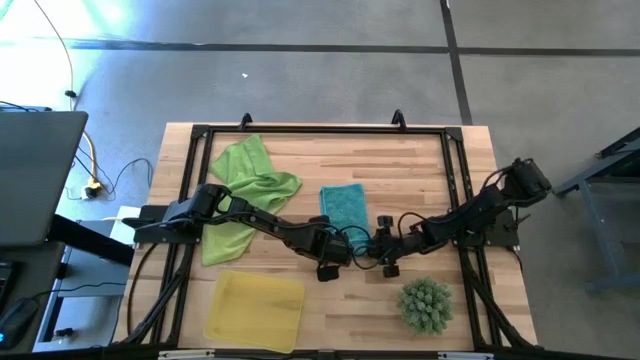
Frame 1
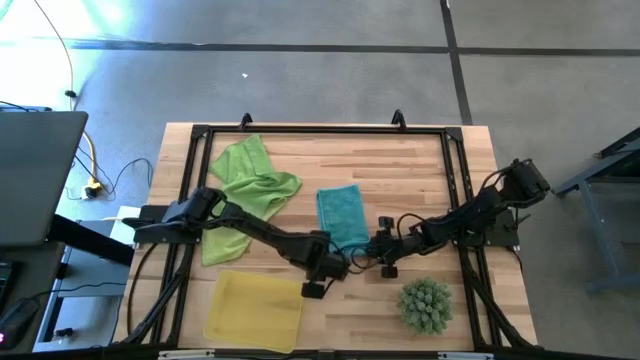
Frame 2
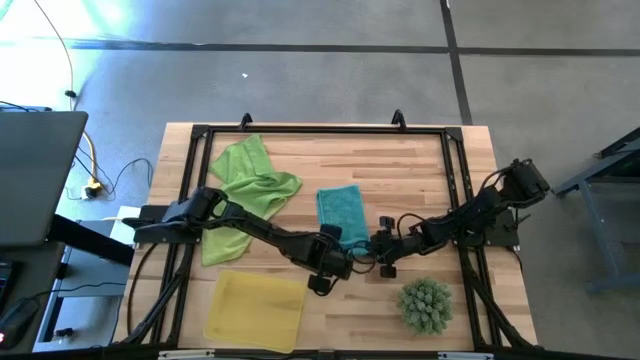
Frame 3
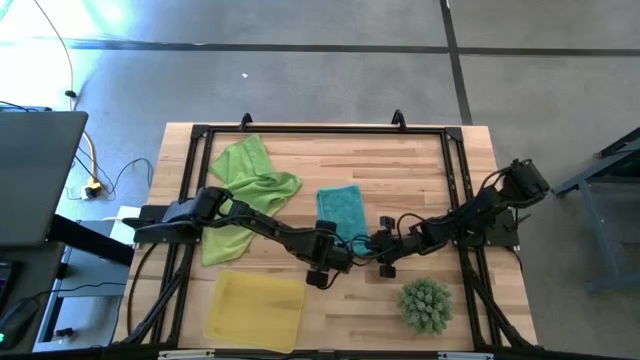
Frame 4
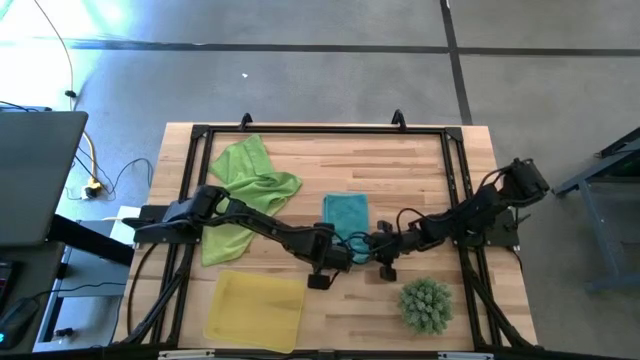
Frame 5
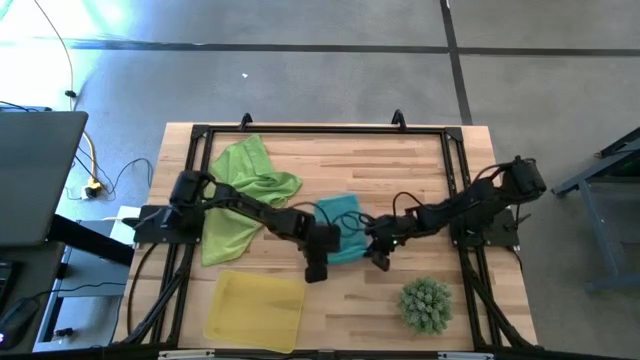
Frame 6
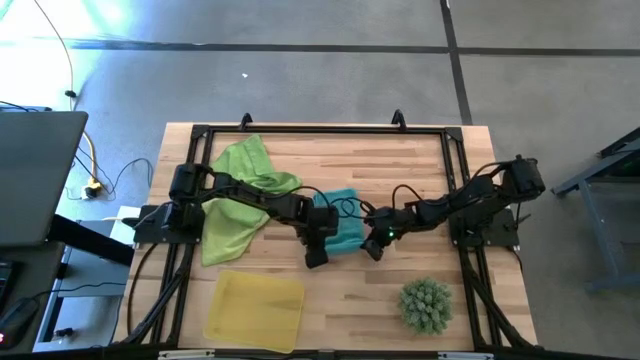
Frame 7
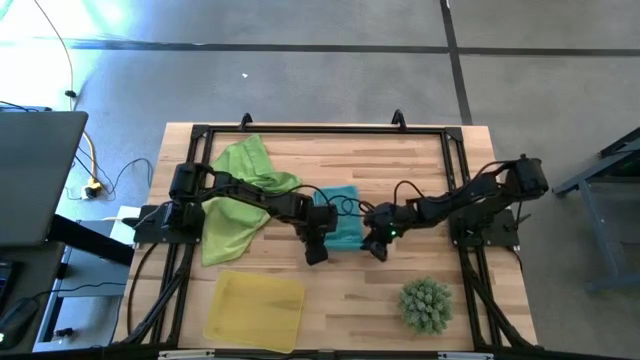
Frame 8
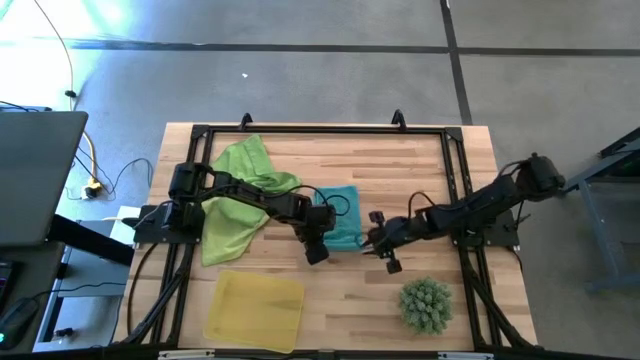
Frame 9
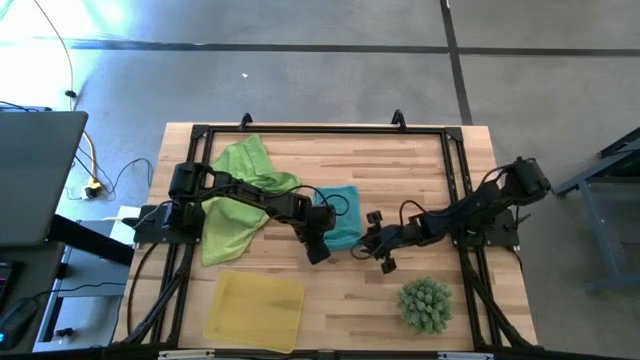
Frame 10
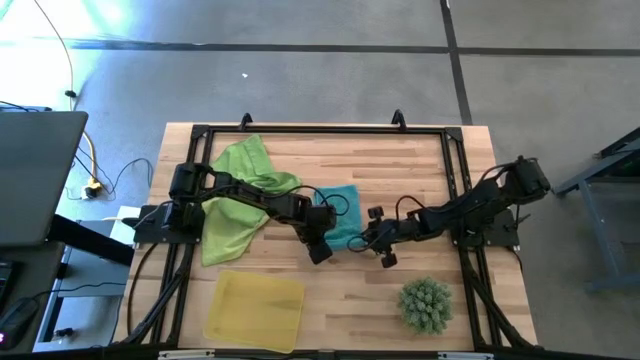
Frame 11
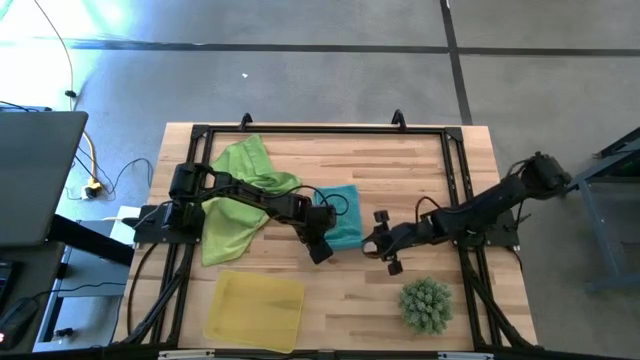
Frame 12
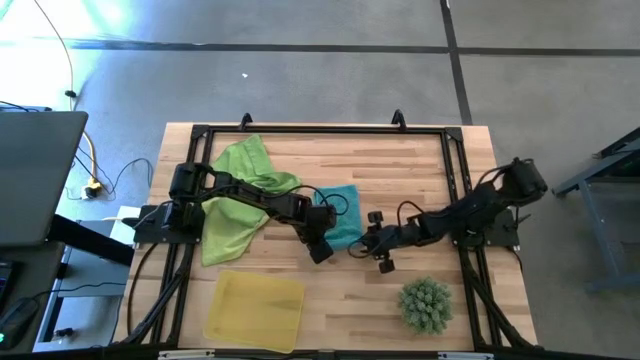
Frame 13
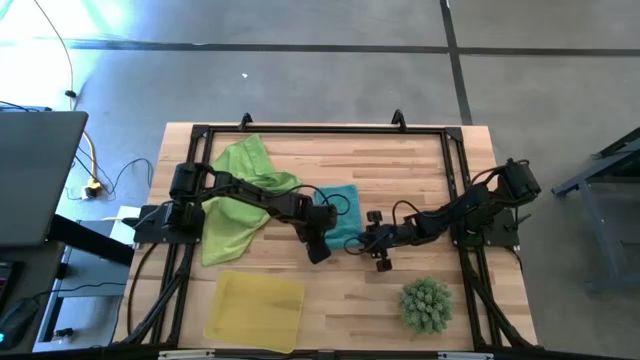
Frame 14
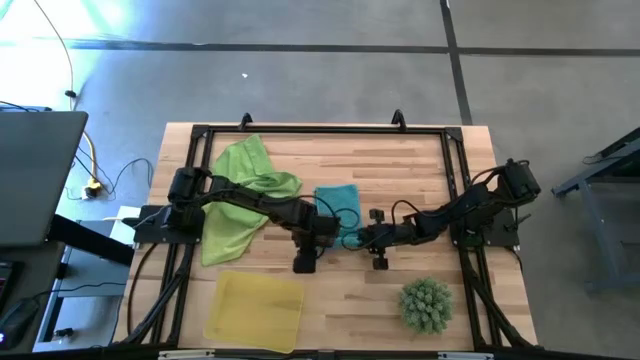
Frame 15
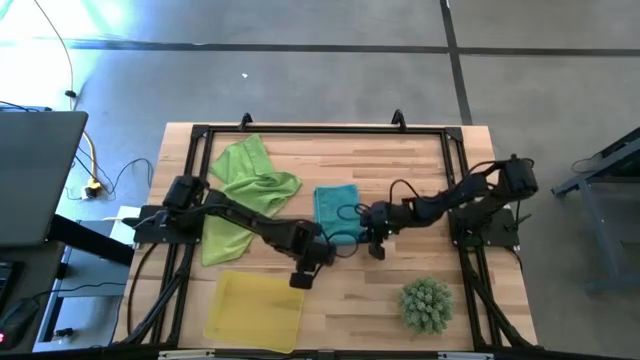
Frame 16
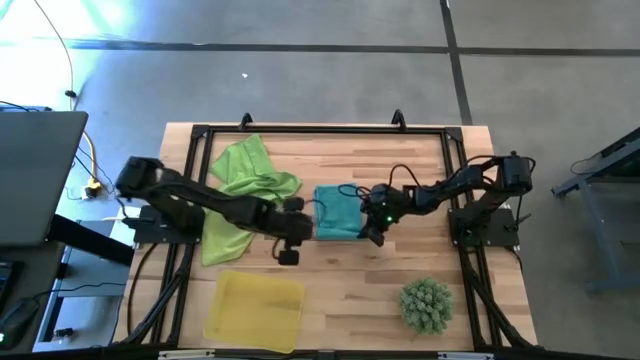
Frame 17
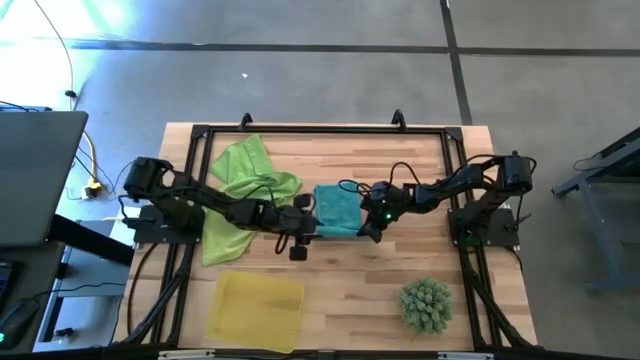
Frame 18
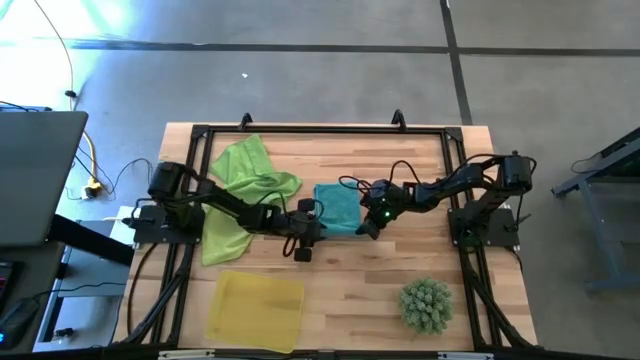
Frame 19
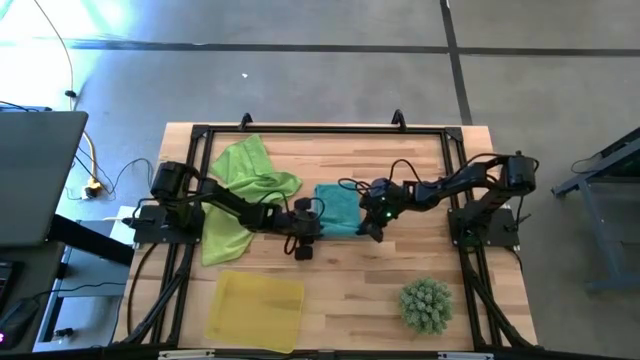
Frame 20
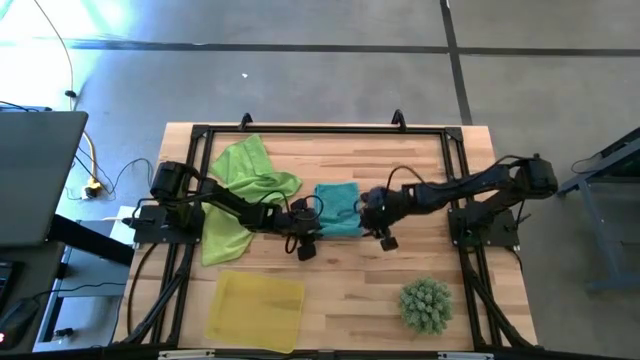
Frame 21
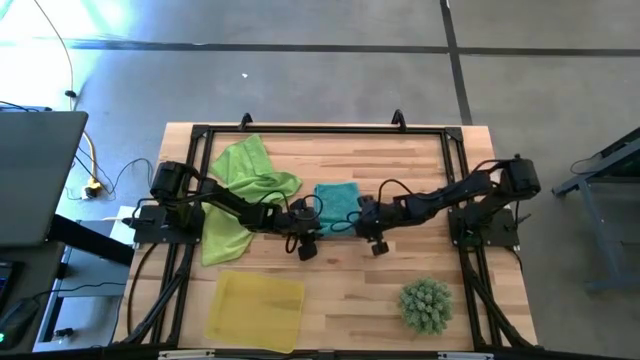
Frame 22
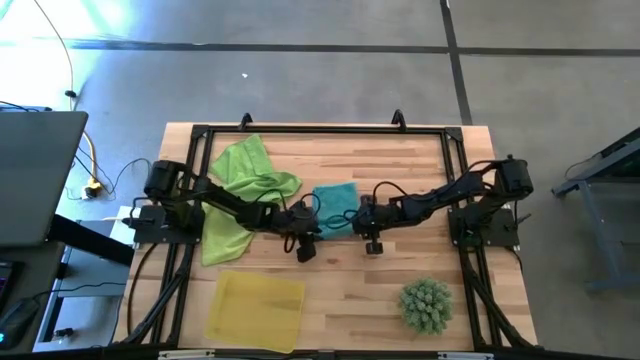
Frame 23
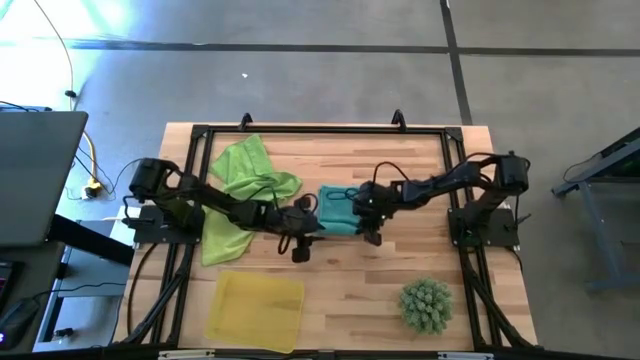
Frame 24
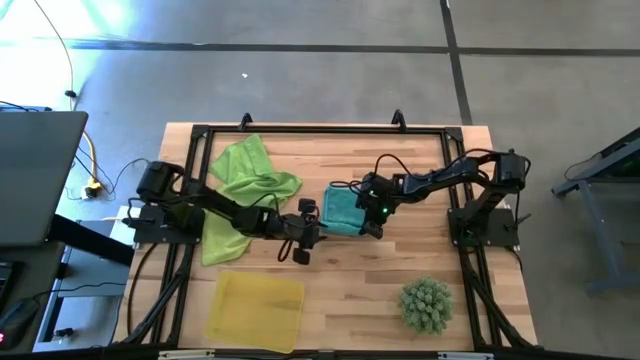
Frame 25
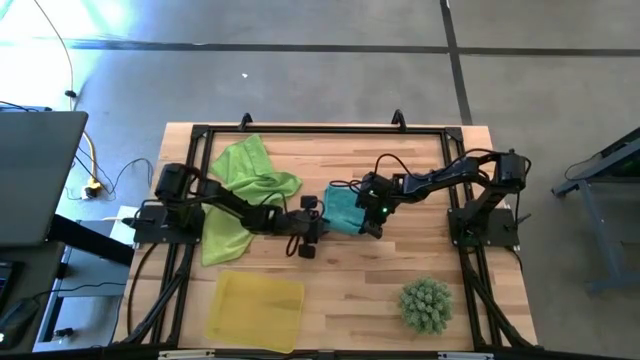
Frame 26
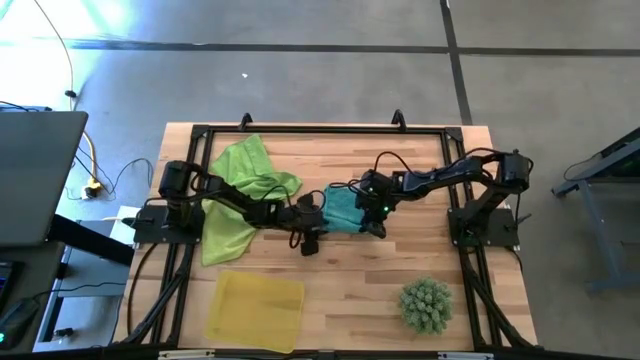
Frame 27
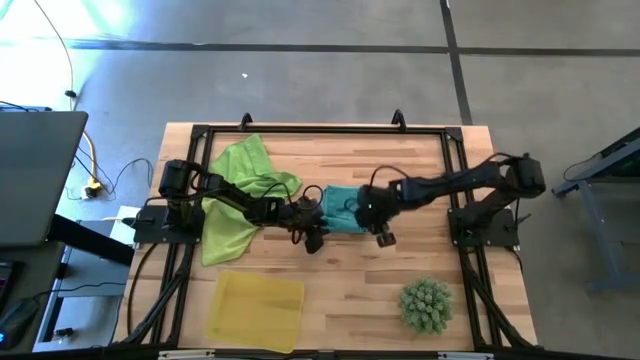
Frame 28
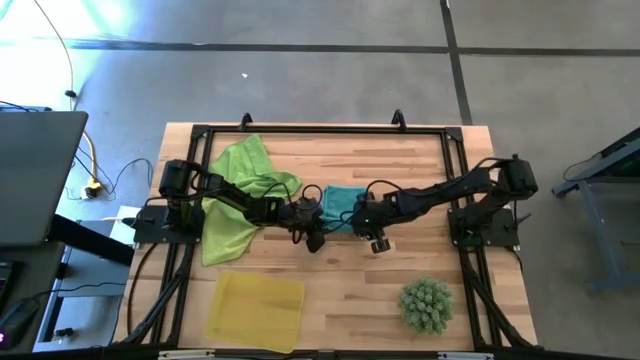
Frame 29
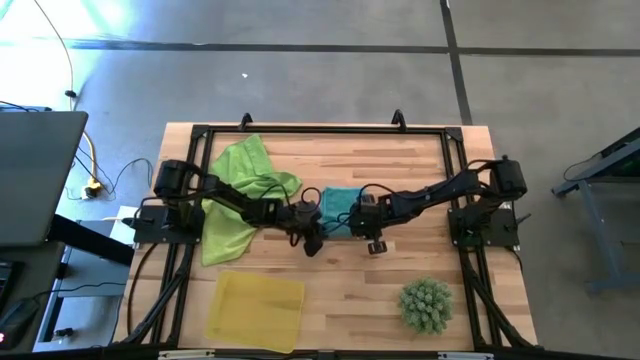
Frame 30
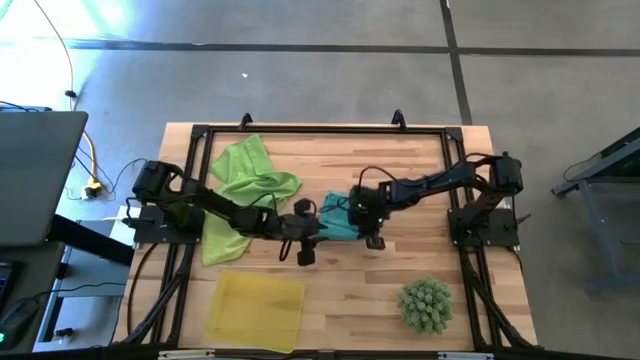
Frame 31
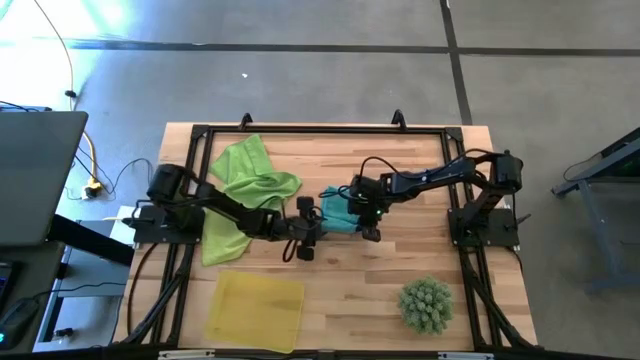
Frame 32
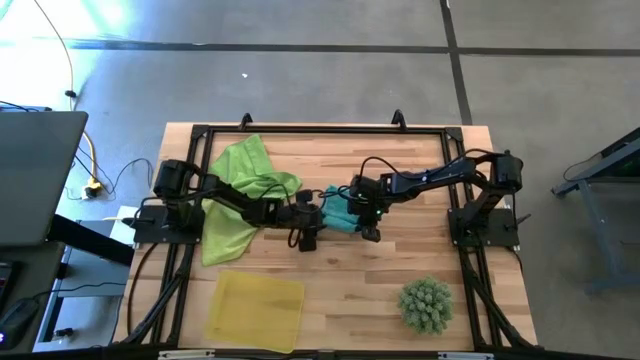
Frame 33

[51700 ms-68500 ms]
Task: Roll microfiber towels into tight, uniform cylinder then place into a basket
Roll the blue microfiber towel
